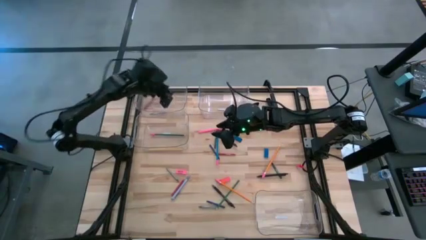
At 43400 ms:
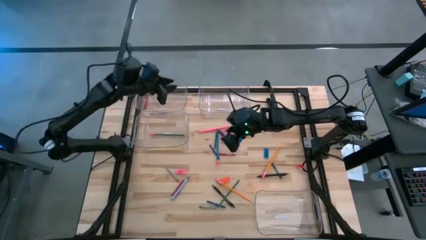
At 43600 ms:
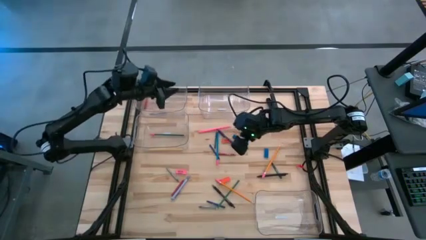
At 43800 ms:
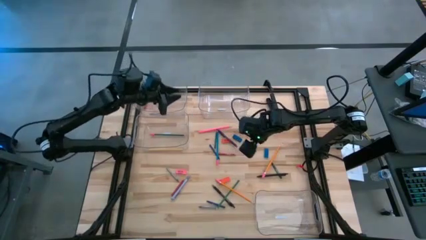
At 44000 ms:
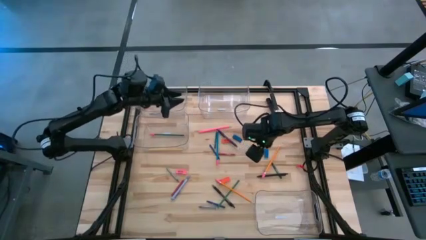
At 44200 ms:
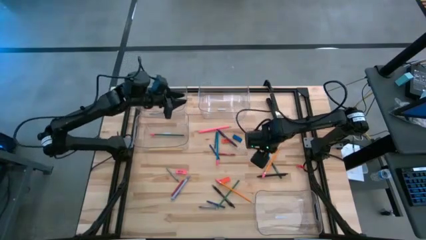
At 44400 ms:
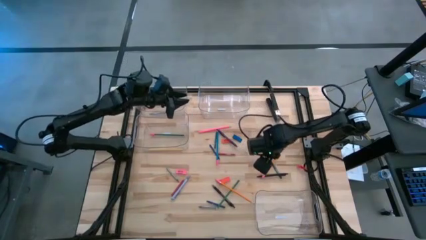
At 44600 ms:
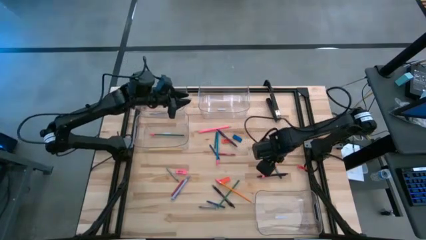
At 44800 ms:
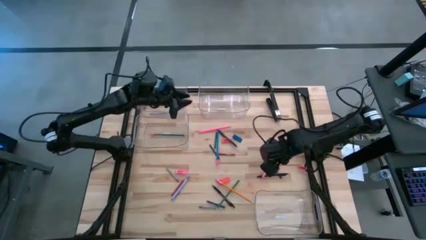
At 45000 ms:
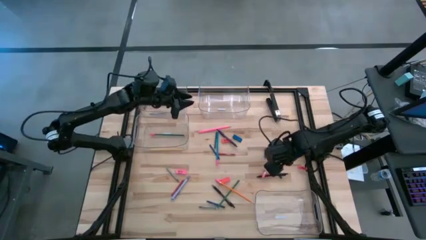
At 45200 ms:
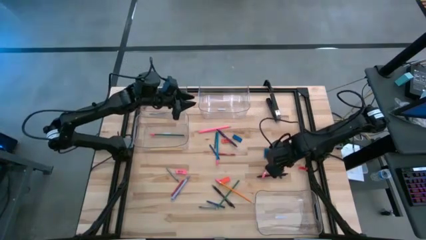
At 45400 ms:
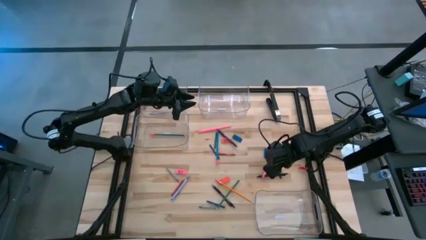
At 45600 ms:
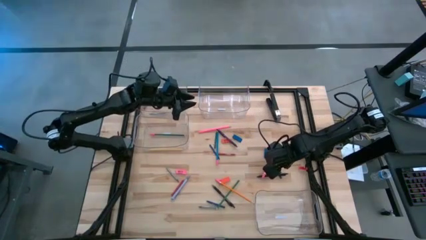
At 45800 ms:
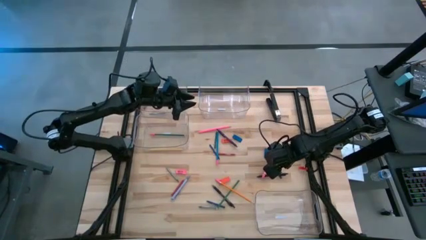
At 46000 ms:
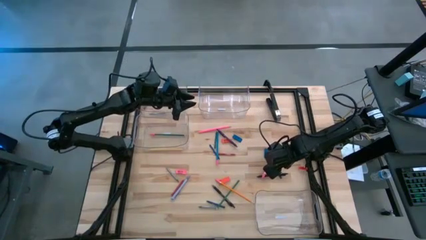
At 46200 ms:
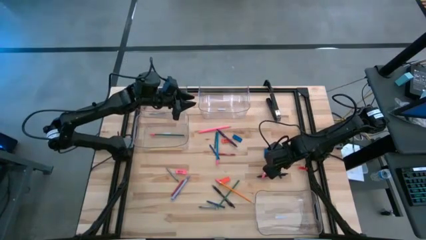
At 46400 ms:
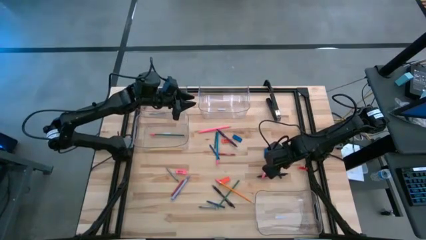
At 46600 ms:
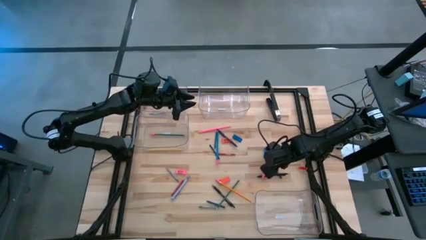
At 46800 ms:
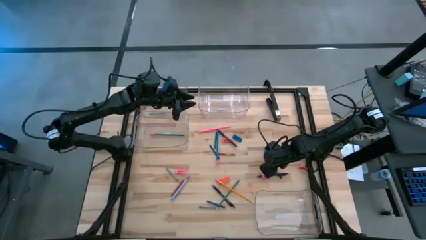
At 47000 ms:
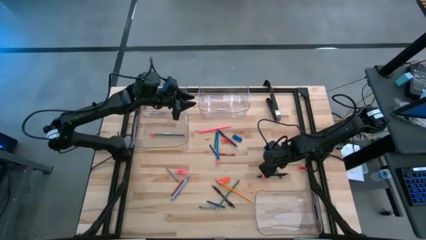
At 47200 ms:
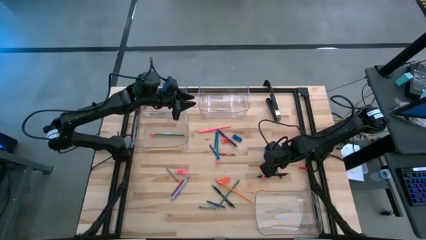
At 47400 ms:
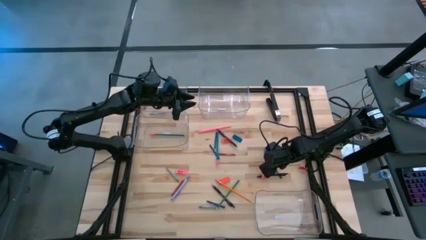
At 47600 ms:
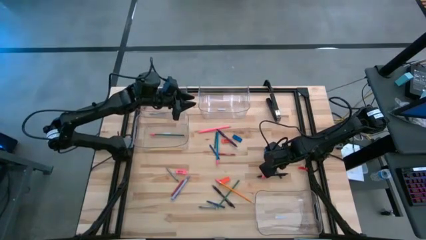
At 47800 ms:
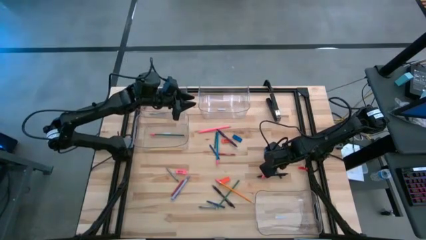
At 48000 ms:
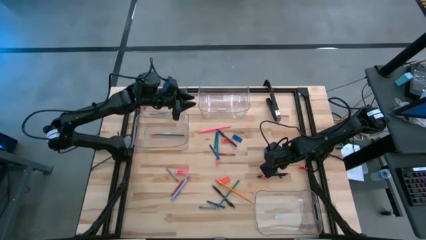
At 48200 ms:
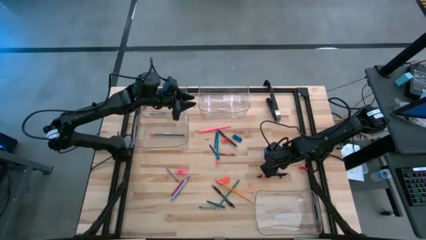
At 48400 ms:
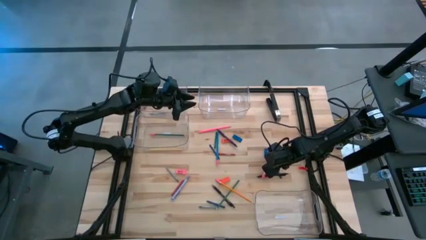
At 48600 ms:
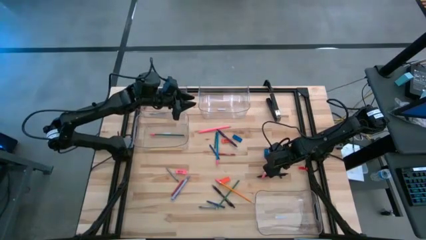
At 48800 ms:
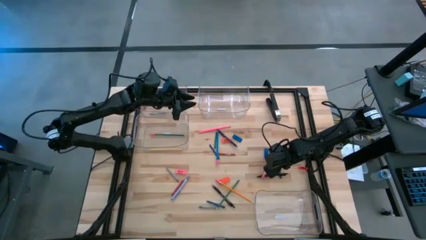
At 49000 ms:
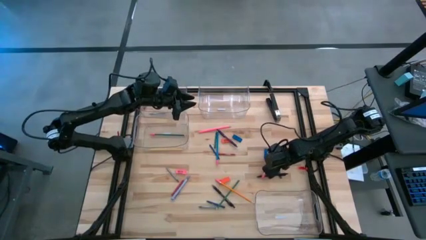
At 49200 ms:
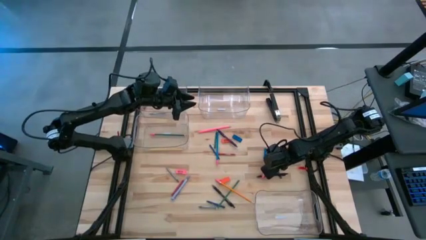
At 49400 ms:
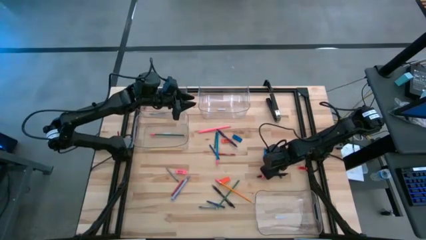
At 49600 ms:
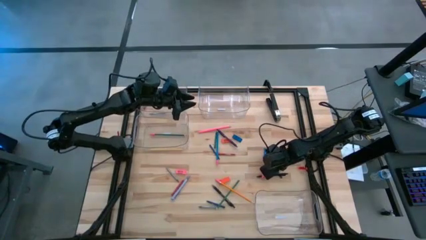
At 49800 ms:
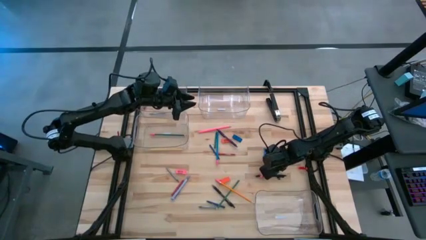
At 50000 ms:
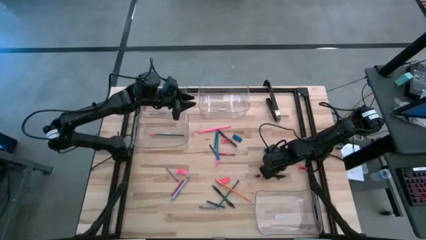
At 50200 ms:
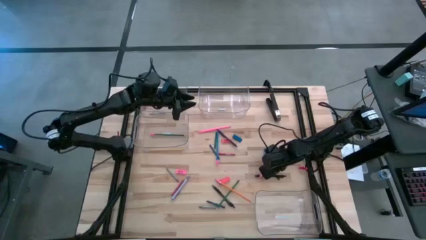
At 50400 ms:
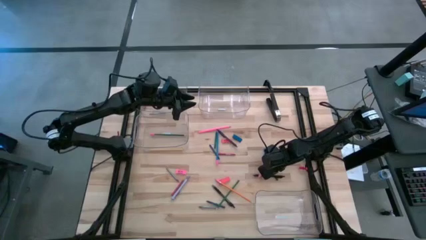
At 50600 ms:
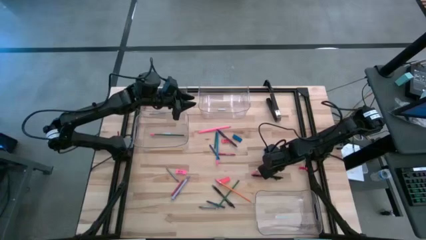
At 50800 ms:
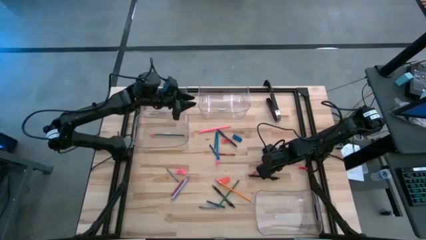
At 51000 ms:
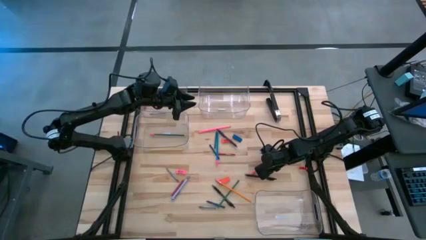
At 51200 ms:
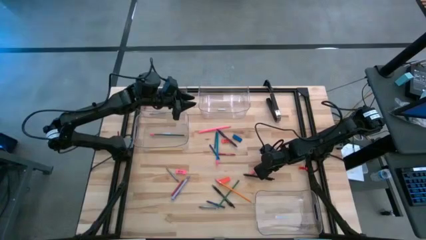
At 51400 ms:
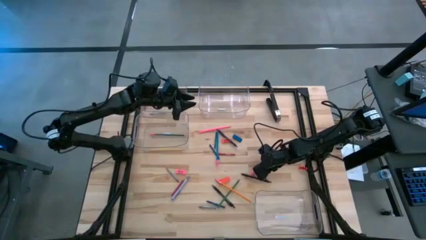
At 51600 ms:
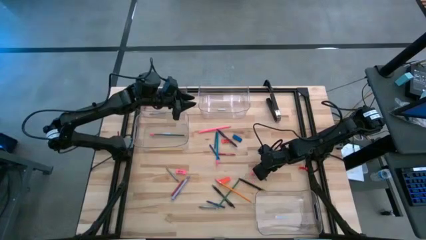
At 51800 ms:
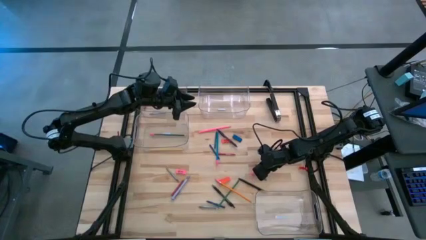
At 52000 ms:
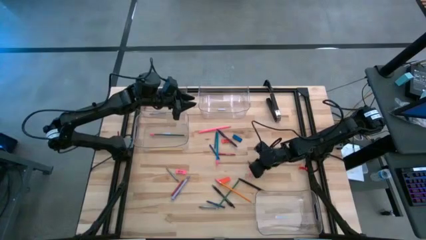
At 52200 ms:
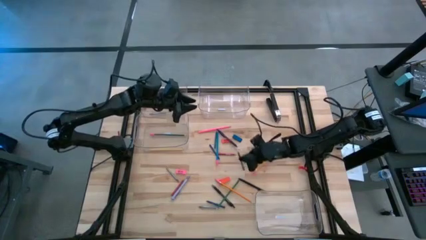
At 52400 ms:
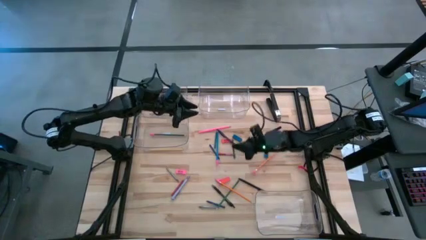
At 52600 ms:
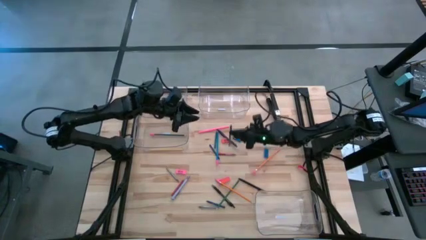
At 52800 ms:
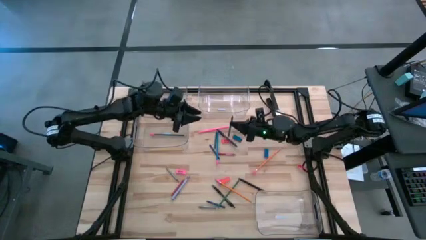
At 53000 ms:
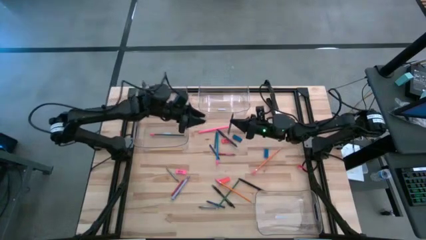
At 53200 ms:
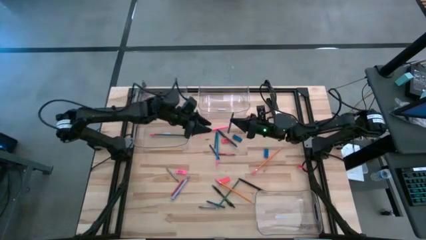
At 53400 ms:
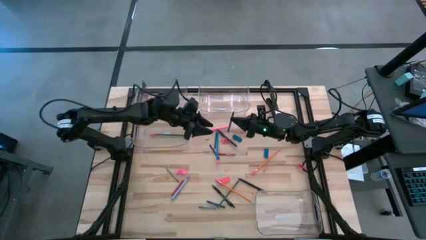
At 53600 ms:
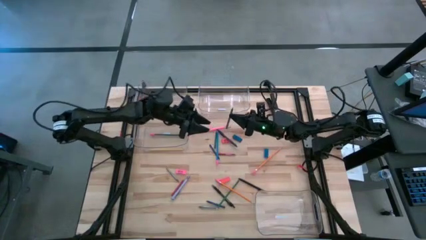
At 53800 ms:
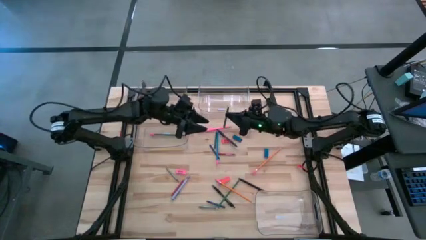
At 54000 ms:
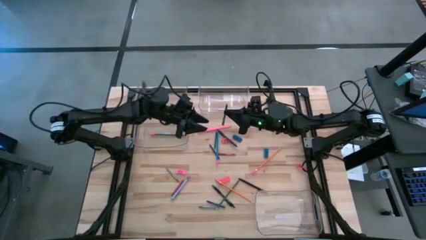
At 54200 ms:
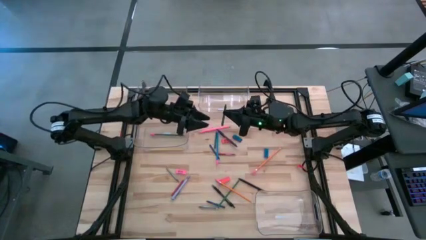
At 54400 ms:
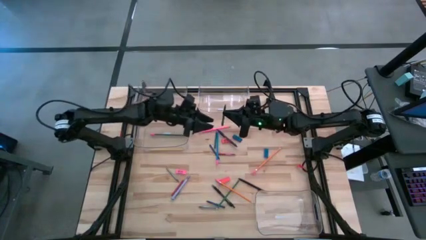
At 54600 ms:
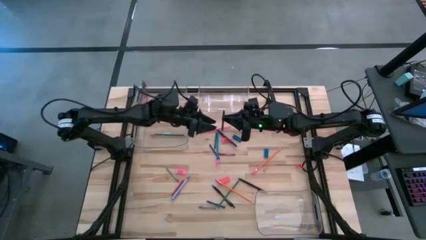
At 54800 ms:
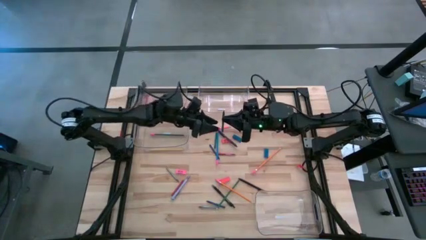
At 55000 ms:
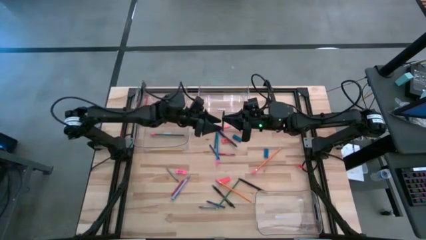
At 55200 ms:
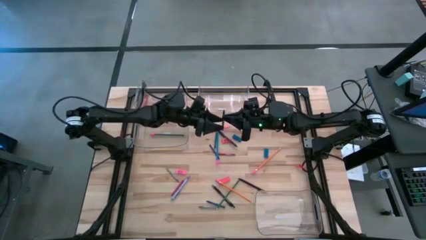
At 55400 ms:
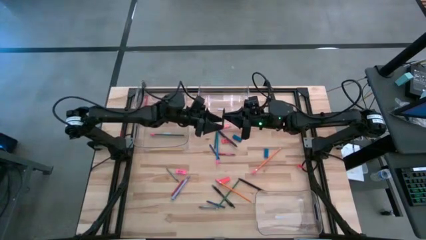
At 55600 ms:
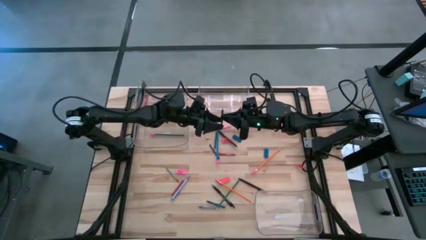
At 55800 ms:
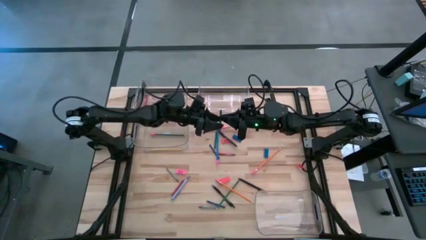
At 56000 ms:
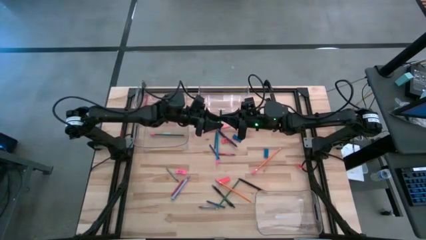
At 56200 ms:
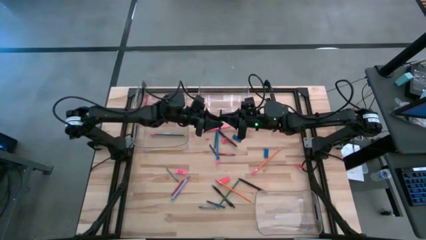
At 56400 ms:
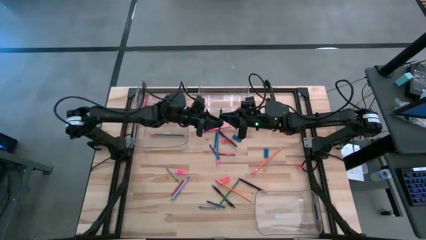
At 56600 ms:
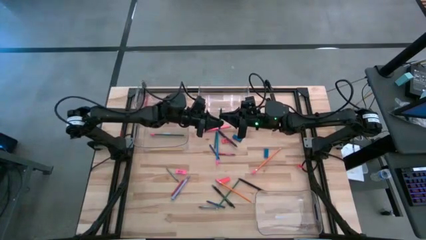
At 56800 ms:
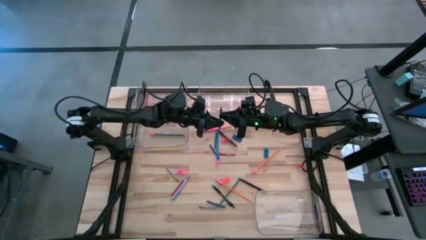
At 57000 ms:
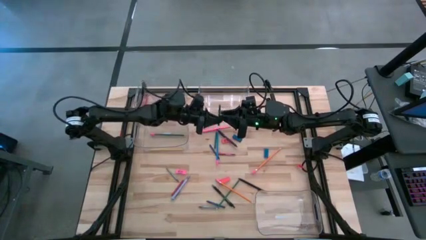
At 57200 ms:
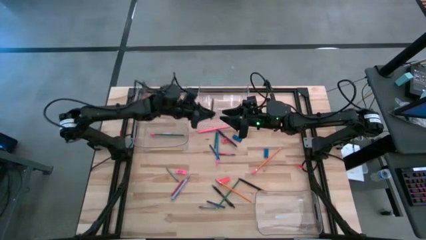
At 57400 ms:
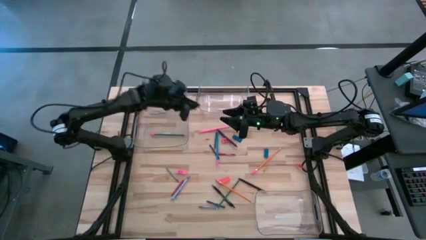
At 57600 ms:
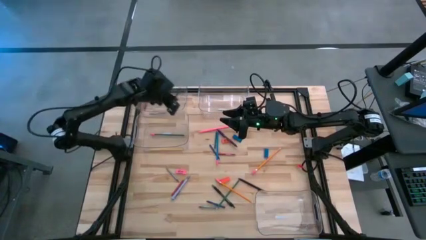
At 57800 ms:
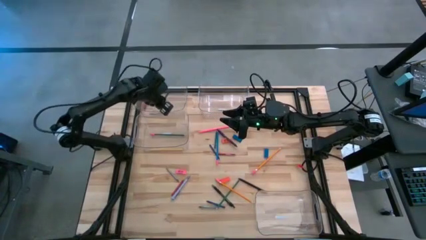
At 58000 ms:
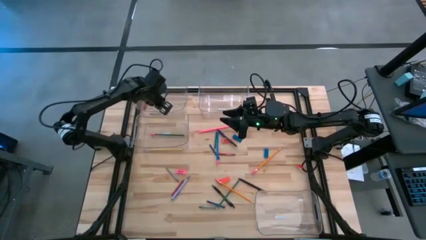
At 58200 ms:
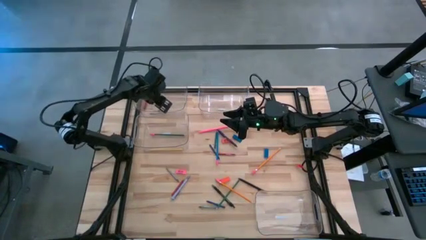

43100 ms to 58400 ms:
Task: Sort crayons/erasers/pens/pencils in bins
Put the green crayon into the top left transparent bin

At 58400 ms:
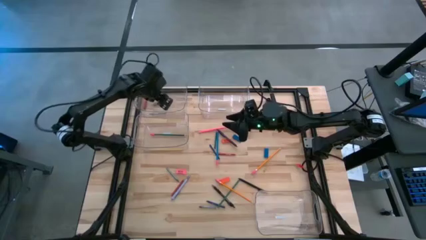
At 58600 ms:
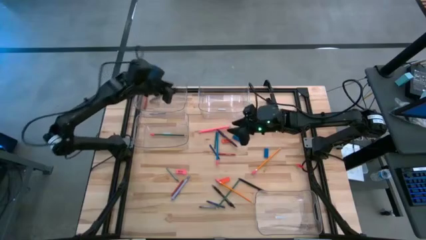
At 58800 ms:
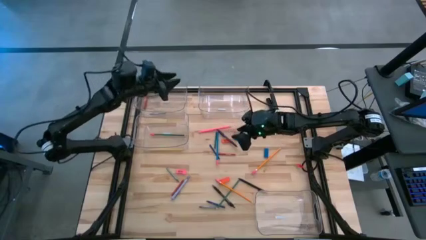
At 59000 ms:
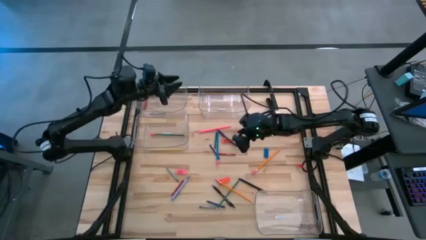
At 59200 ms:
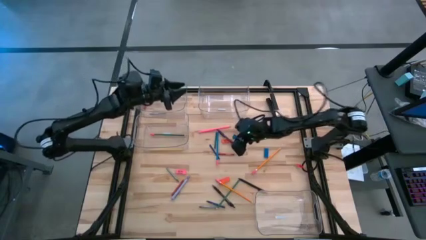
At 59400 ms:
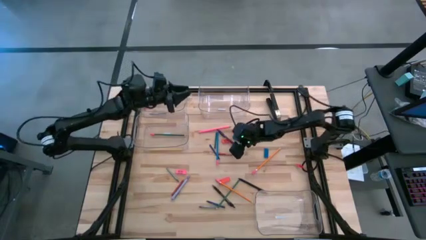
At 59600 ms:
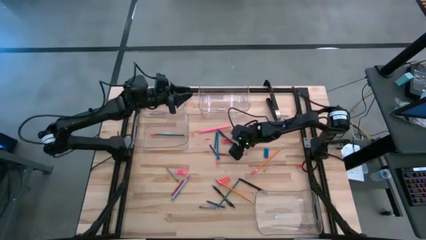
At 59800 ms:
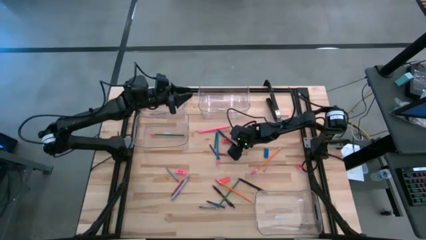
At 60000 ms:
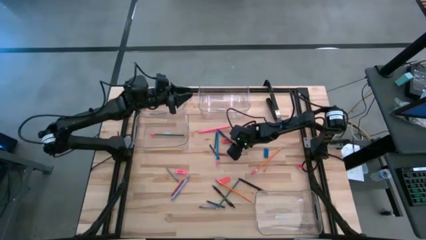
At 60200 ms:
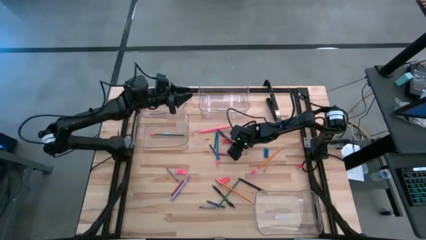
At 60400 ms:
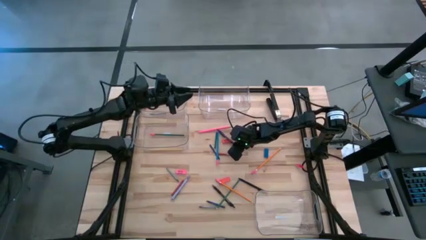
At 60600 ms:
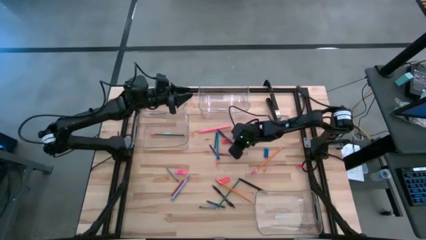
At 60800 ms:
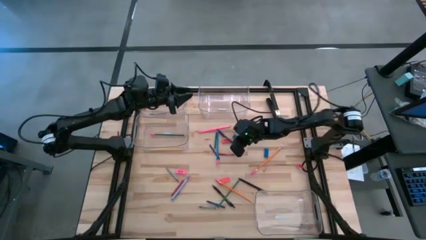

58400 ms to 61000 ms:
Put the violet pen into the top right transparent bin
